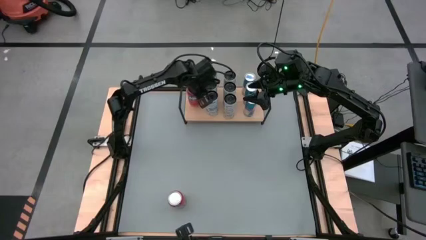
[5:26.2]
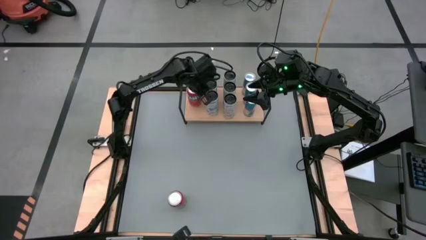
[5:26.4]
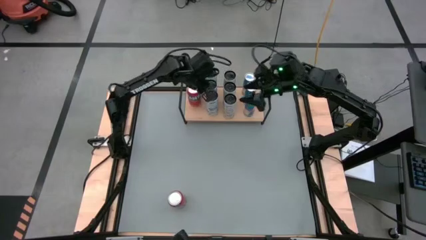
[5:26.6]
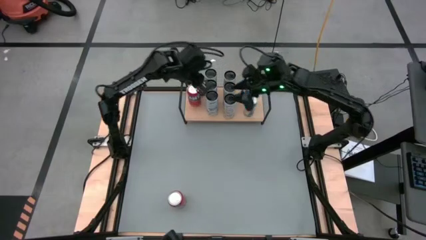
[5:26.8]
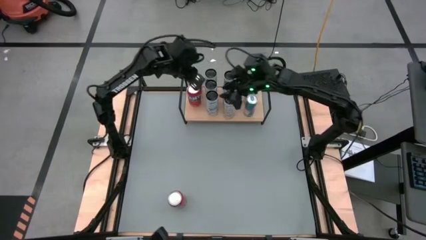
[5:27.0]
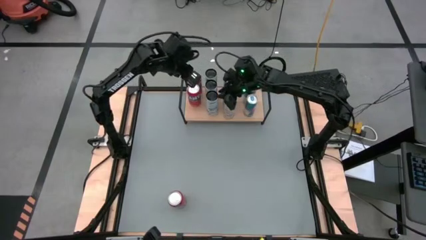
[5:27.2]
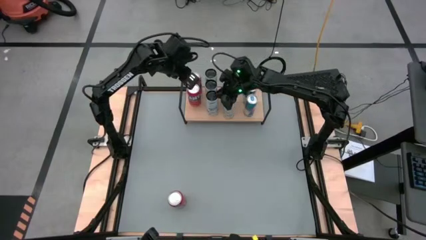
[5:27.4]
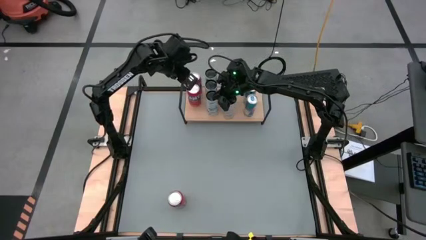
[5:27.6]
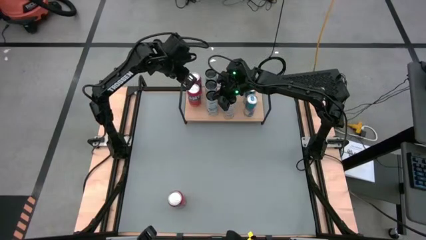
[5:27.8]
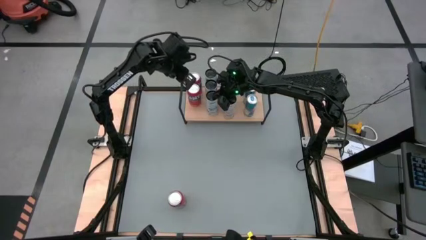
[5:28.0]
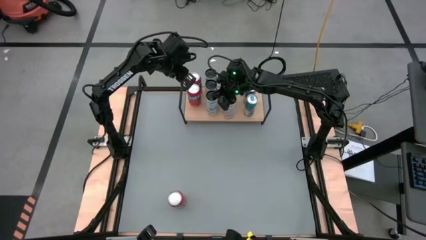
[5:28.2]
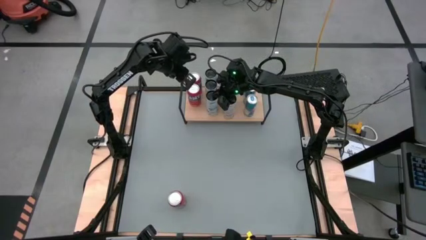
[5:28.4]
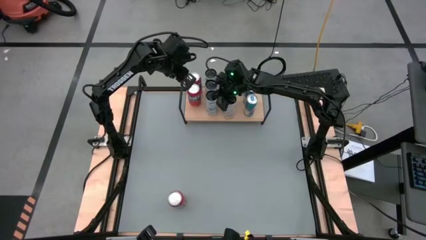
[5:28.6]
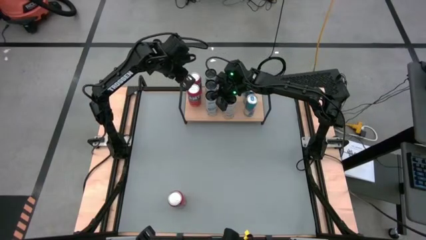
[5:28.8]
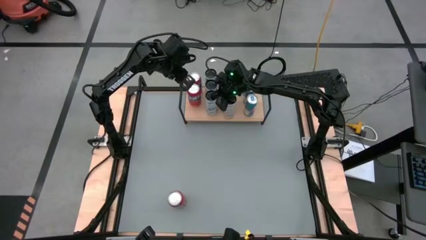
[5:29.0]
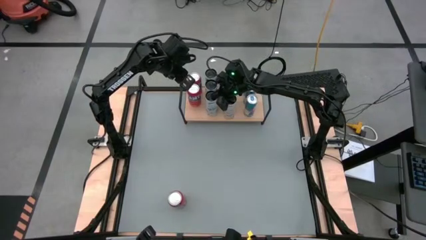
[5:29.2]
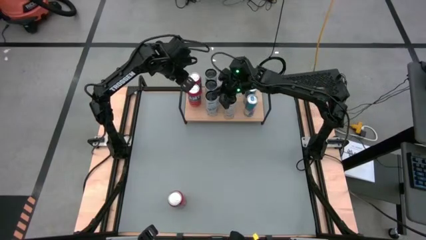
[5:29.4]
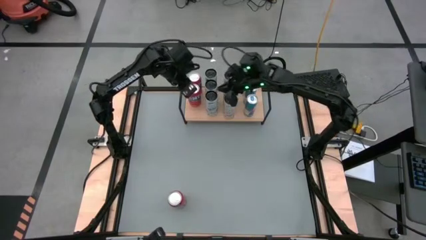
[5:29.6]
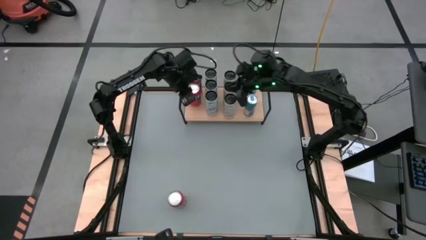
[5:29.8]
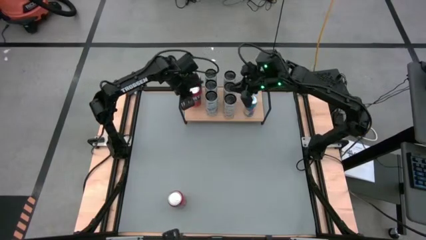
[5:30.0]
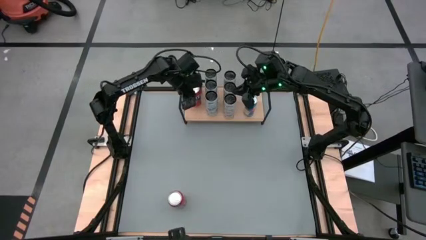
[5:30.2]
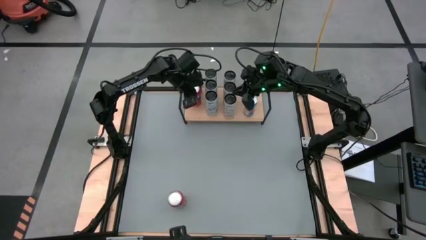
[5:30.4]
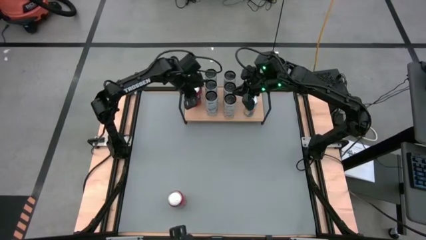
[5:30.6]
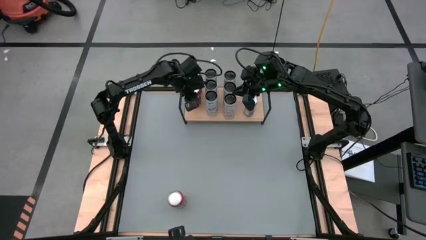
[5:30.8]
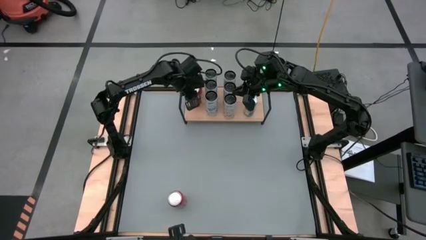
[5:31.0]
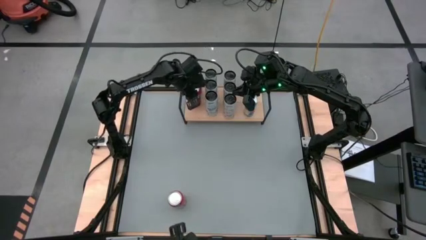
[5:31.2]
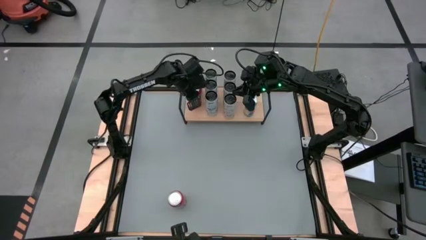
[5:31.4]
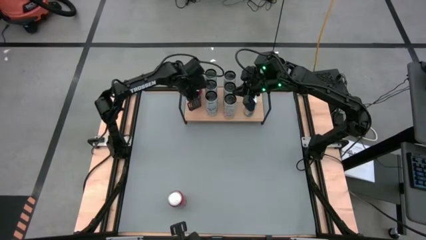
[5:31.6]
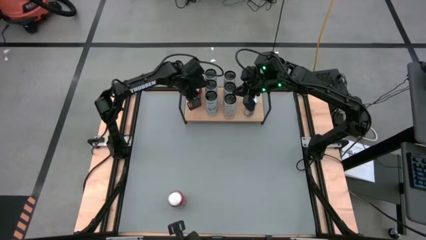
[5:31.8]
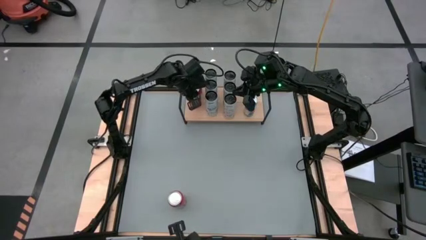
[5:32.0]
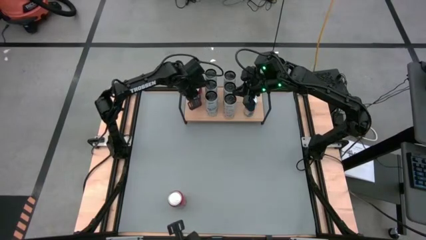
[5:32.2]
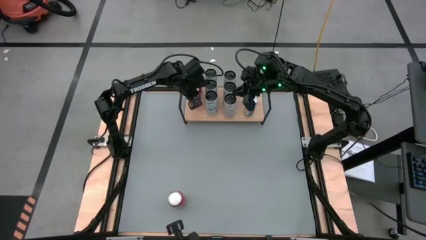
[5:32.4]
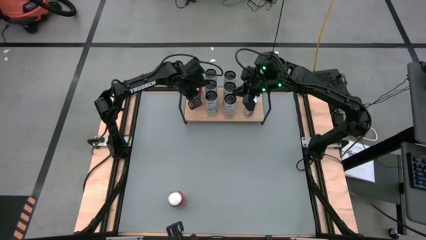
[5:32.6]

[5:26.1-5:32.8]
Task: Place canned beverage on shelf
Adjust the cans on the shelf

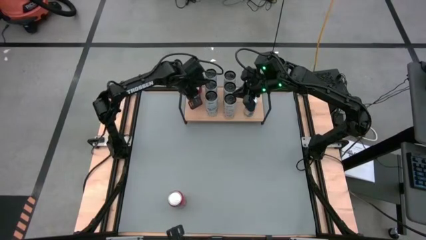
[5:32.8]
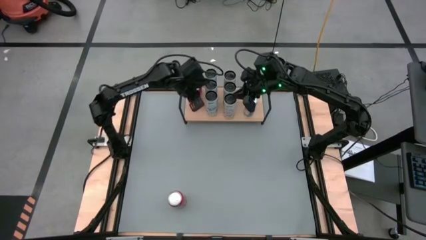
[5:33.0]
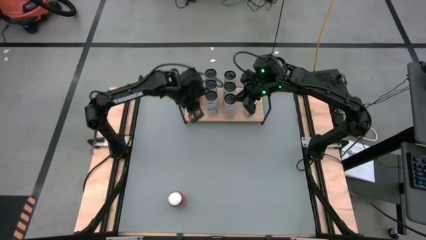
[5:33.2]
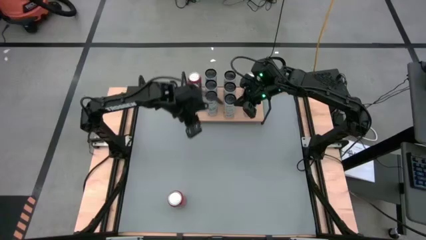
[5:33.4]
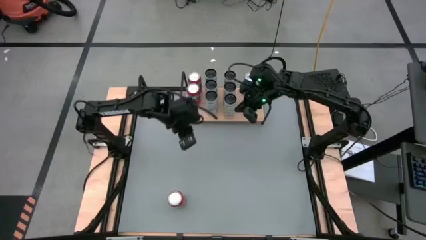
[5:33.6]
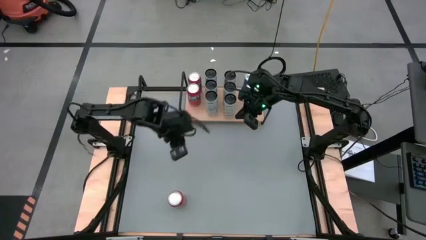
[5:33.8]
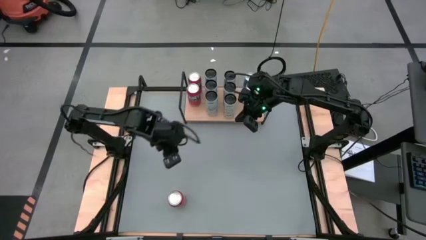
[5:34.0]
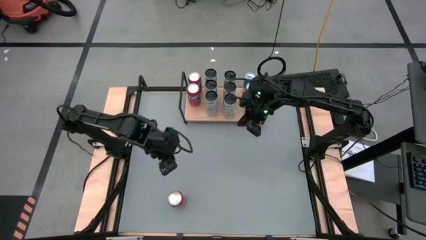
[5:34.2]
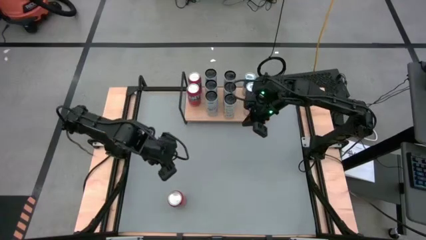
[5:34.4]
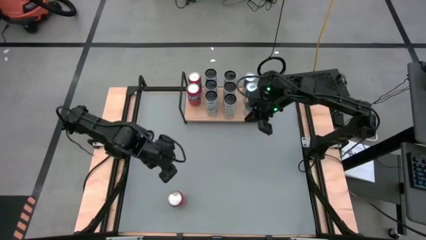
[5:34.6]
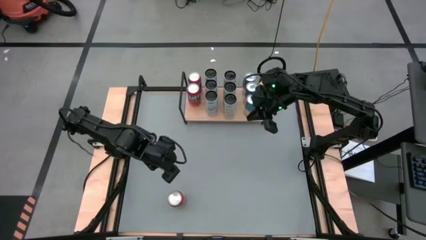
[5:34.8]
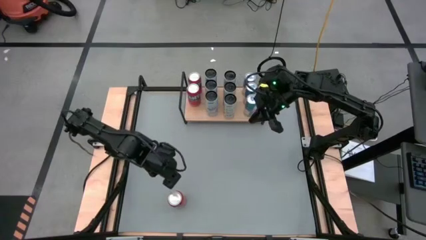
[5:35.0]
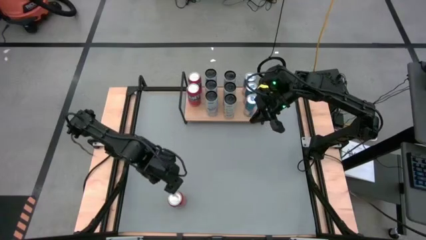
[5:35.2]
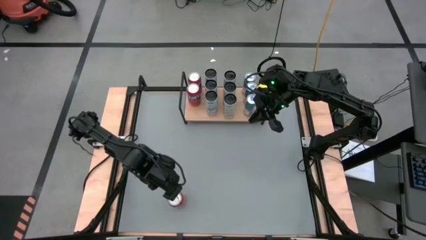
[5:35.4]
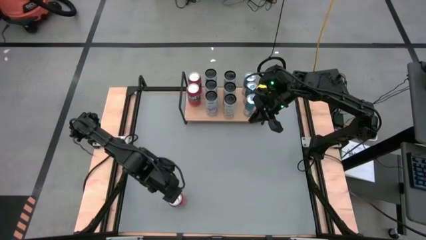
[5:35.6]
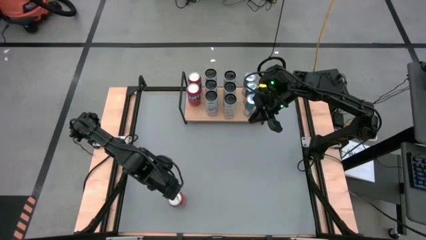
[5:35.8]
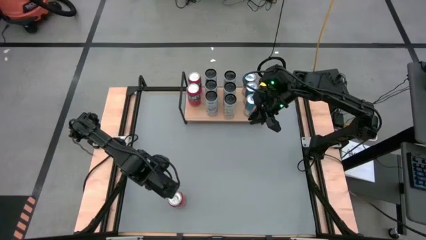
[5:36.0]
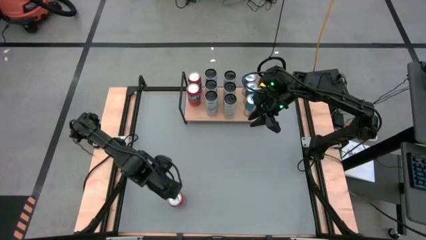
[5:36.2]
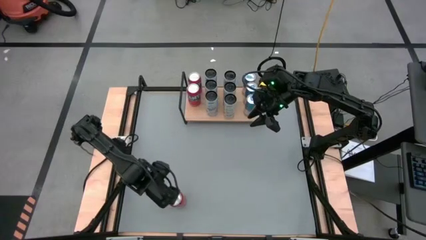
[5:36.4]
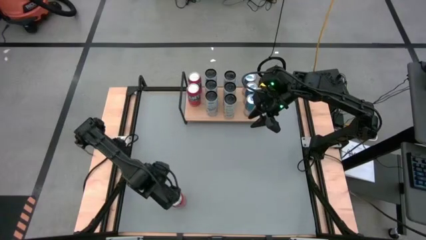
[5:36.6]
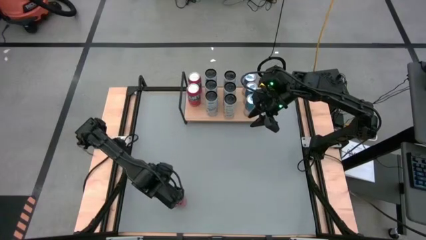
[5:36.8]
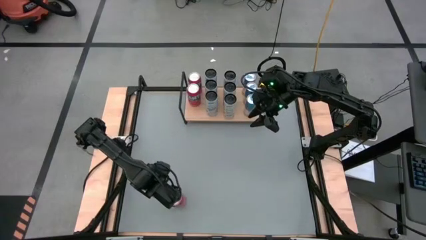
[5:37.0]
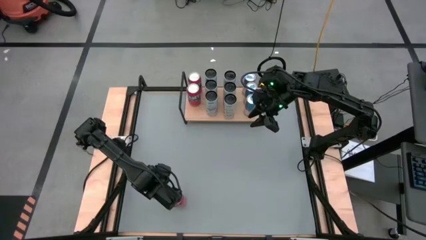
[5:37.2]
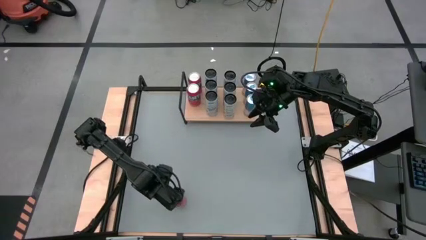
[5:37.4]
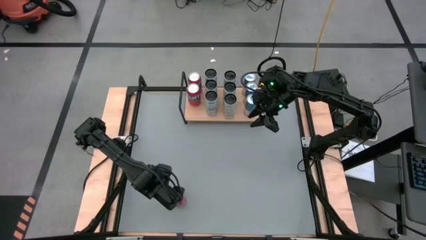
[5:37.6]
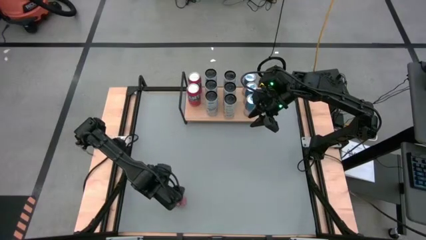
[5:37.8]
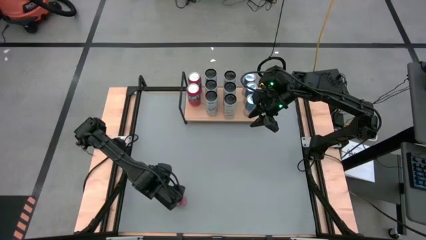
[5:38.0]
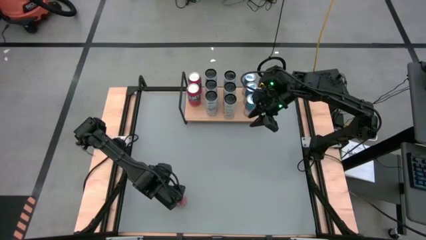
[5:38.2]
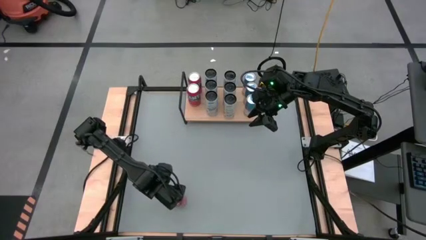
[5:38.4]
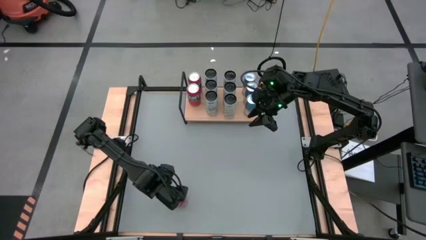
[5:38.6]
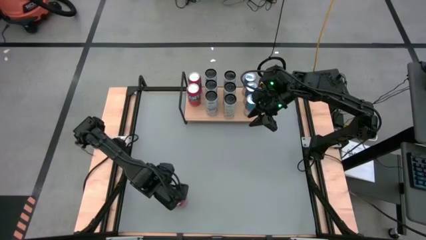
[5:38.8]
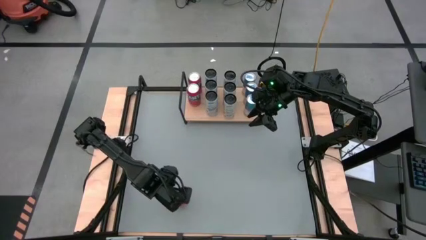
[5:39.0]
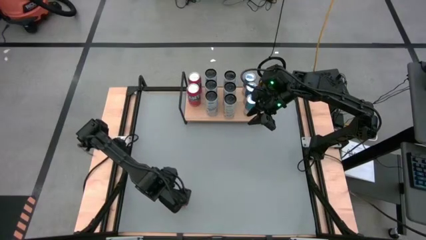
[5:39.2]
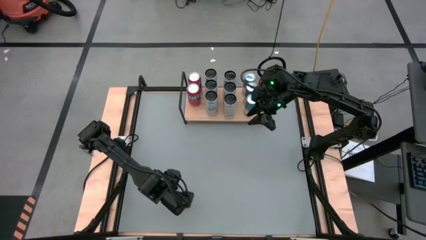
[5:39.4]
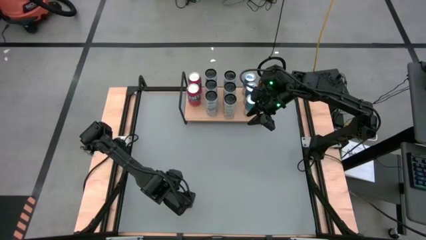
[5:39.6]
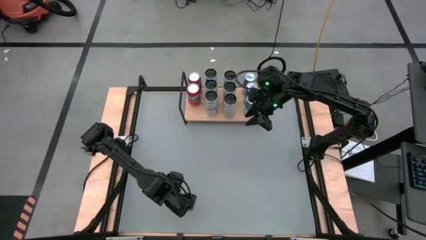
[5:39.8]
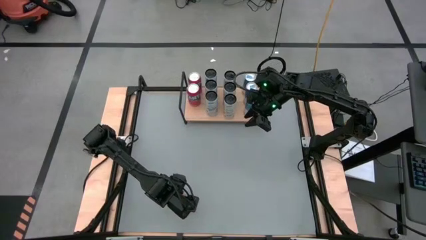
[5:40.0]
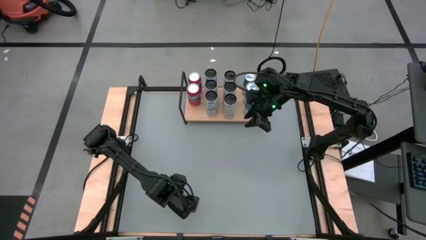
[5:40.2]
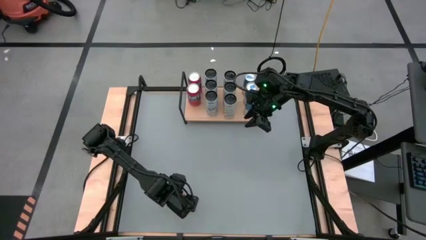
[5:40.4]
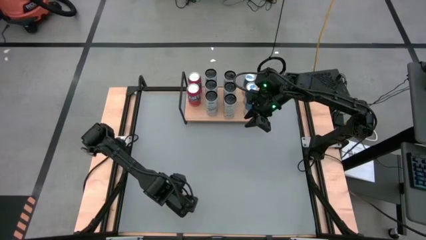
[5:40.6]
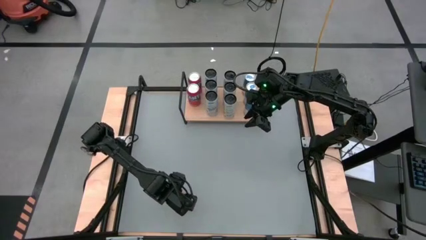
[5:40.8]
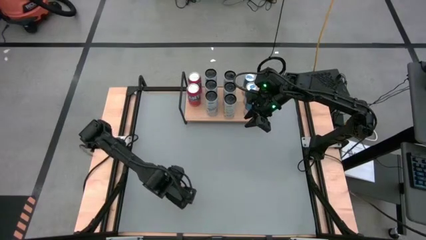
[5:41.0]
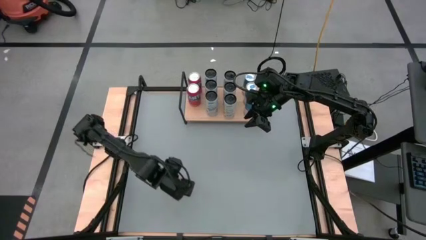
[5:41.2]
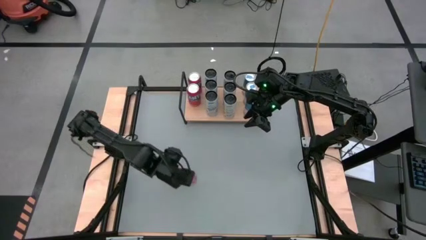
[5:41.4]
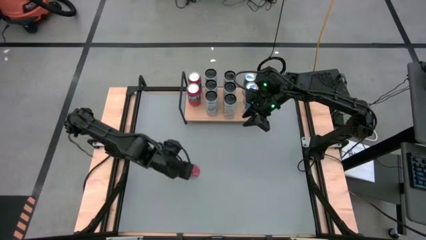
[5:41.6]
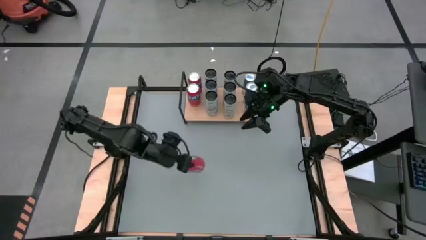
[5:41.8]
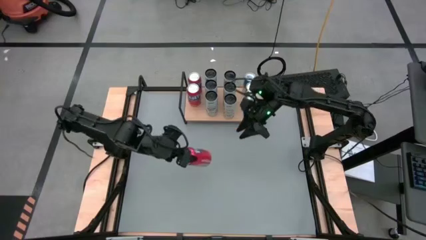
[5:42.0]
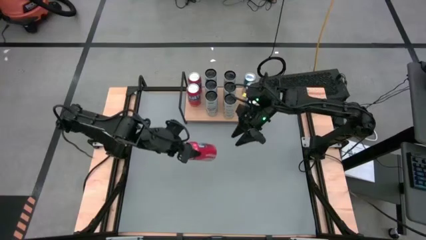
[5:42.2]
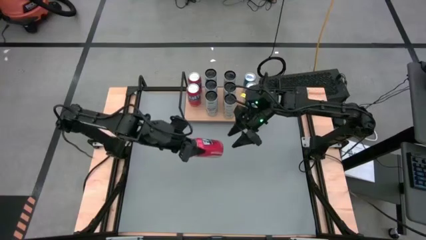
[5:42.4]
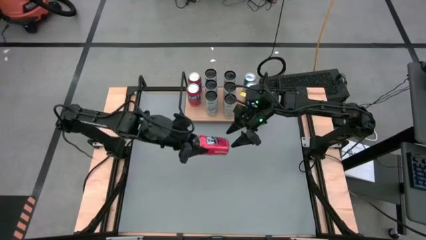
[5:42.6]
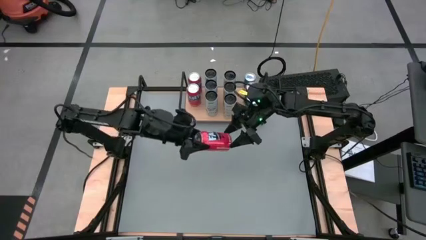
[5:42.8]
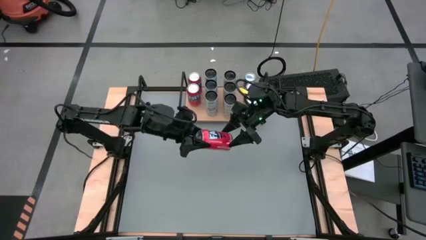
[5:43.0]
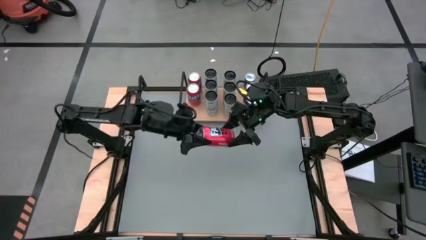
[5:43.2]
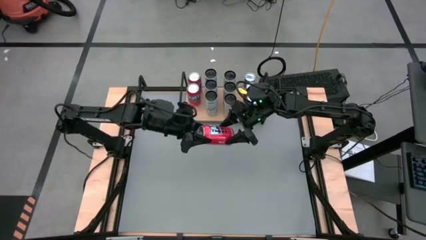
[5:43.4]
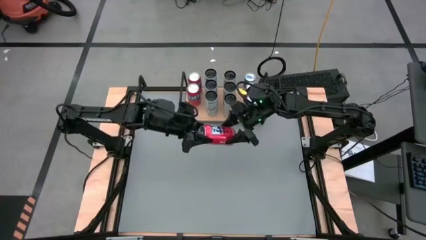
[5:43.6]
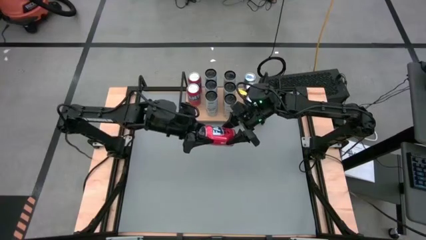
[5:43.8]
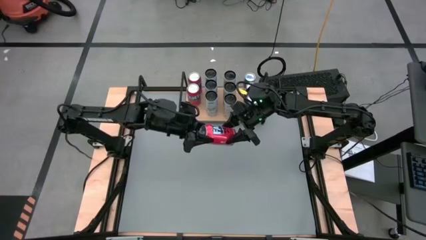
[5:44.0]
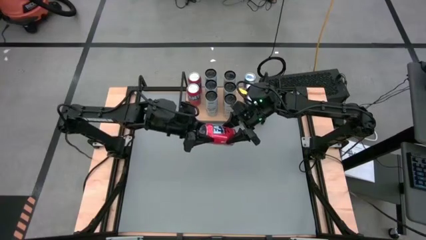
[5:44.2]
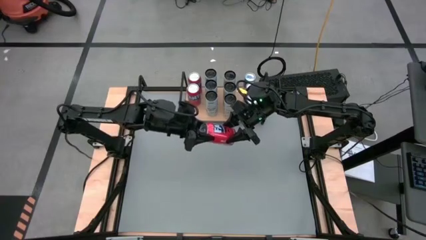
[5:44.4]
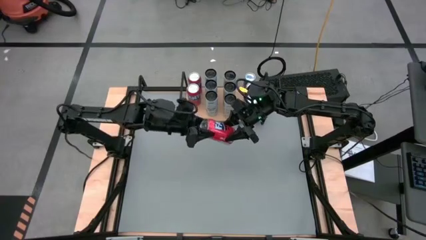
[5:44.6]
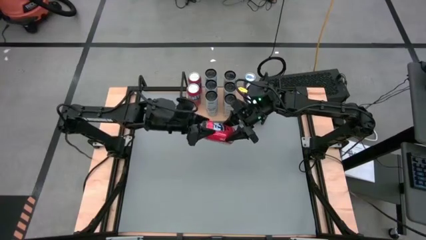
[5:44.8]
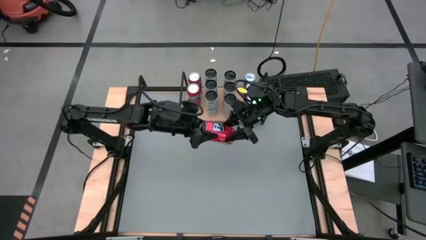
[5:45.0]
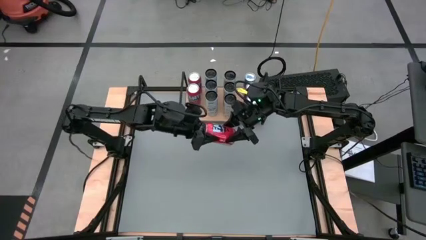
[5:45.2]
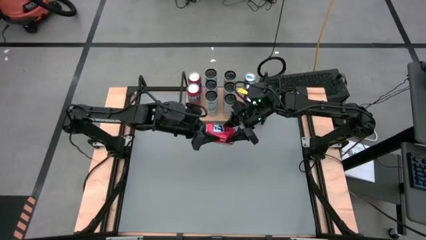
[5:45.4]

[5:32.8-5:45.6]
Put the red soda can aligned with the other red soda cans on the shelf
